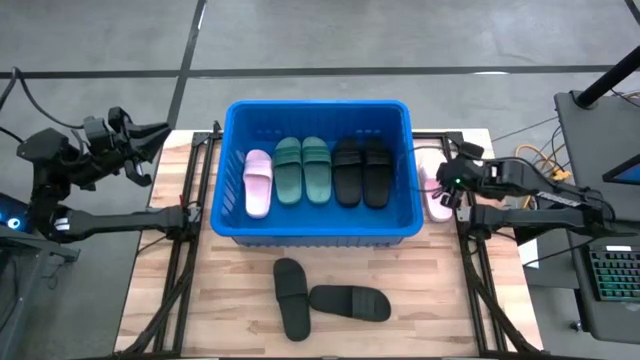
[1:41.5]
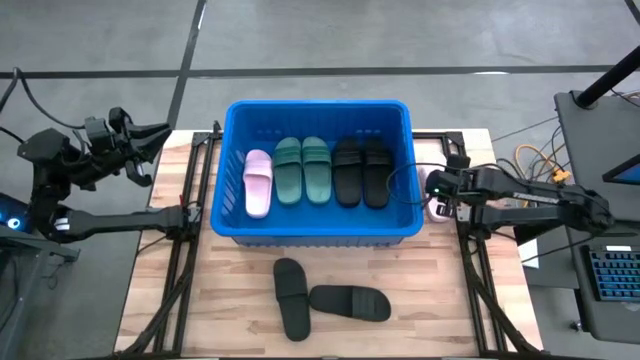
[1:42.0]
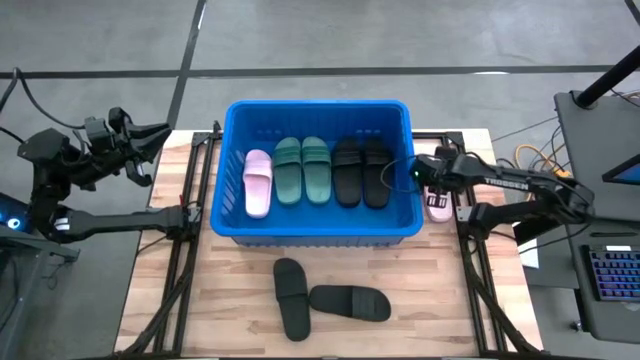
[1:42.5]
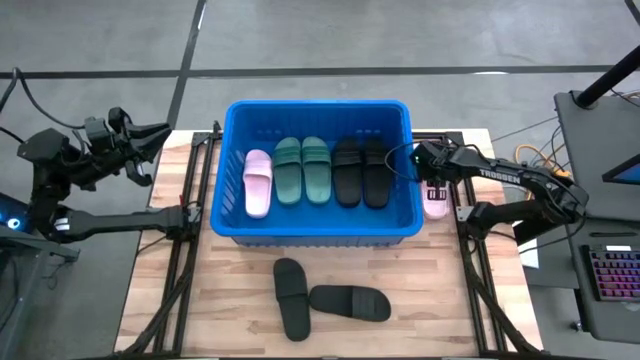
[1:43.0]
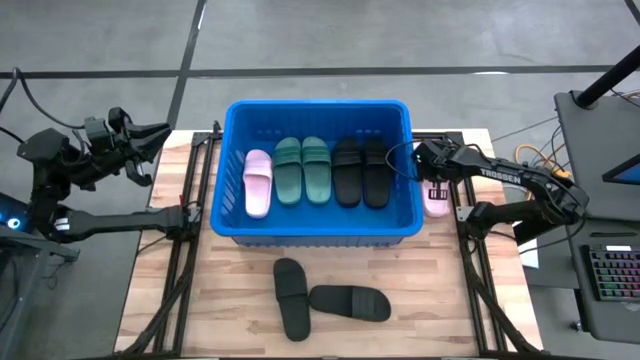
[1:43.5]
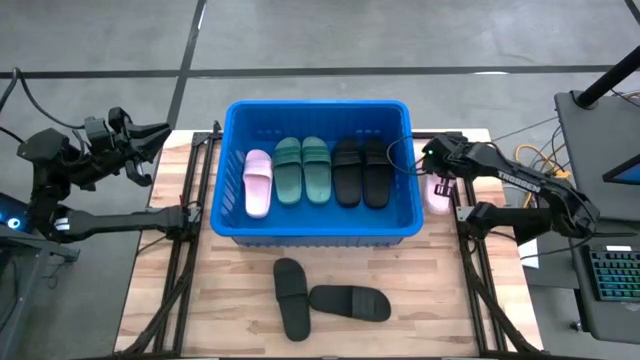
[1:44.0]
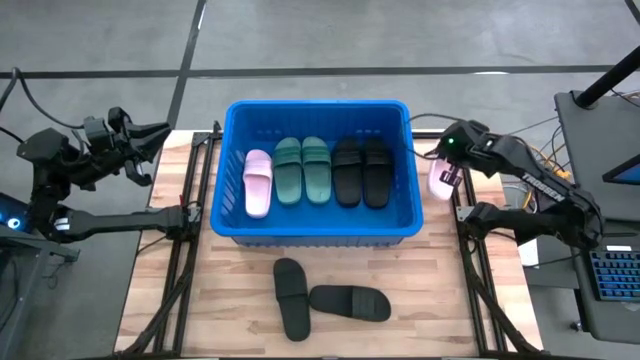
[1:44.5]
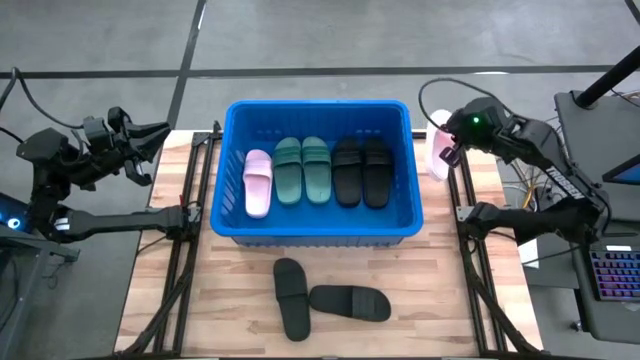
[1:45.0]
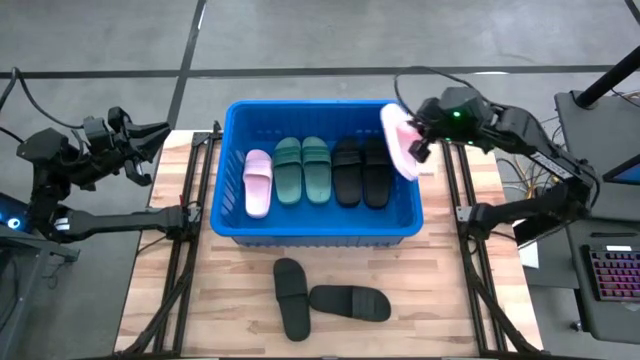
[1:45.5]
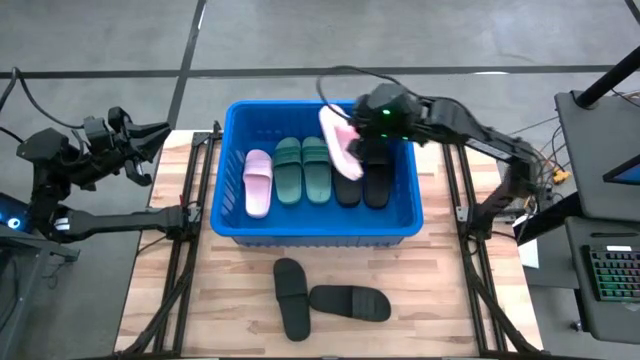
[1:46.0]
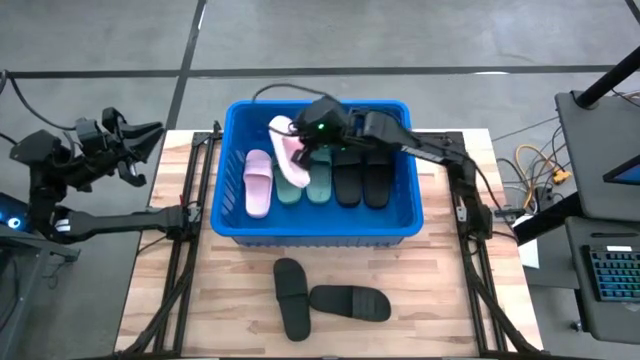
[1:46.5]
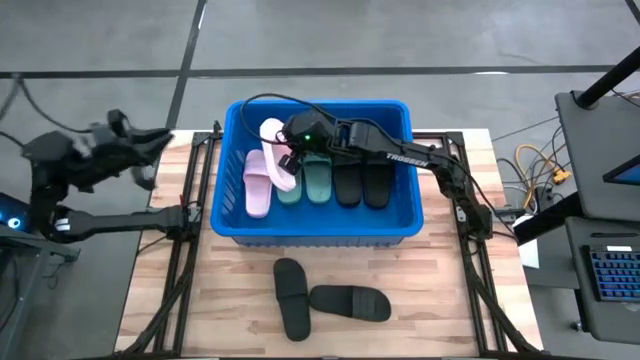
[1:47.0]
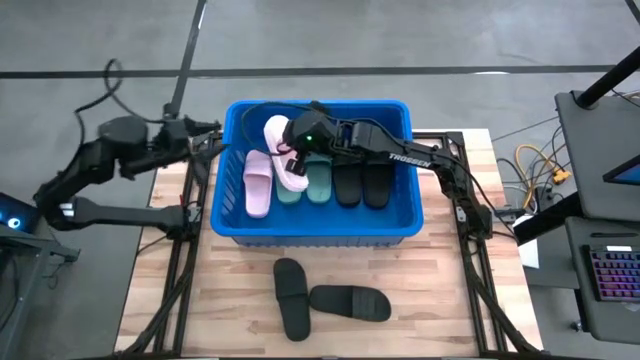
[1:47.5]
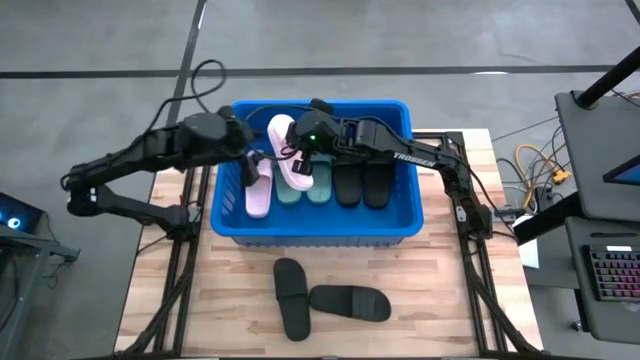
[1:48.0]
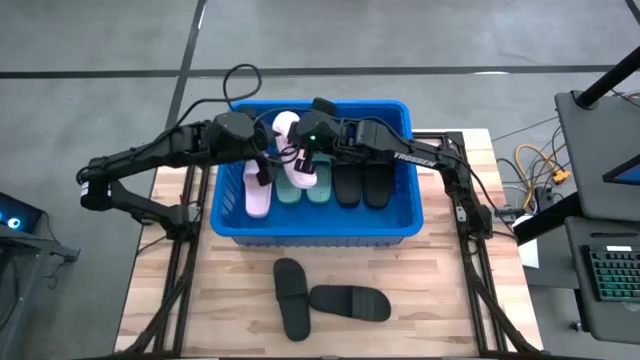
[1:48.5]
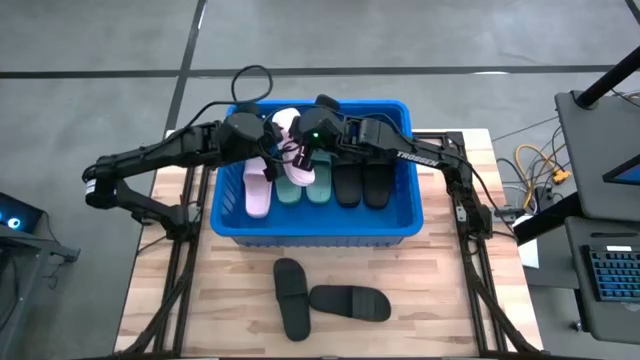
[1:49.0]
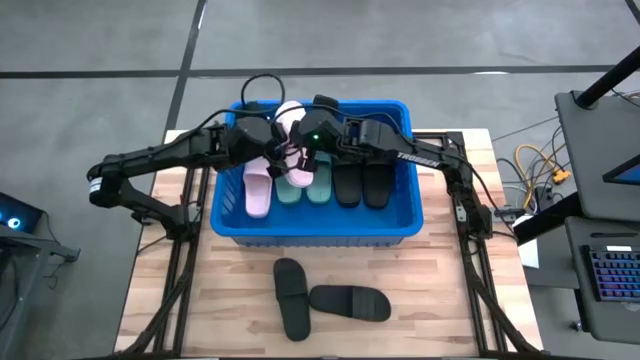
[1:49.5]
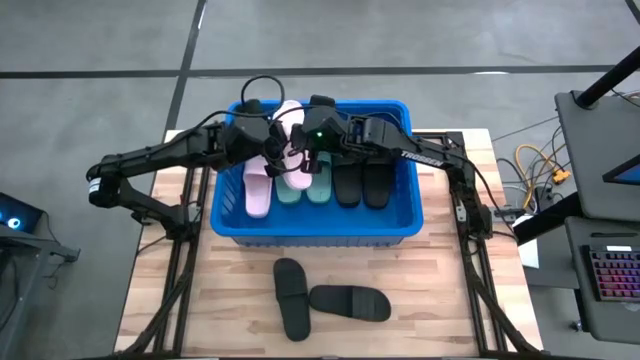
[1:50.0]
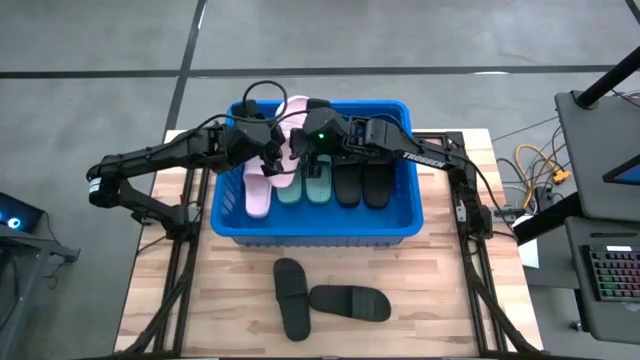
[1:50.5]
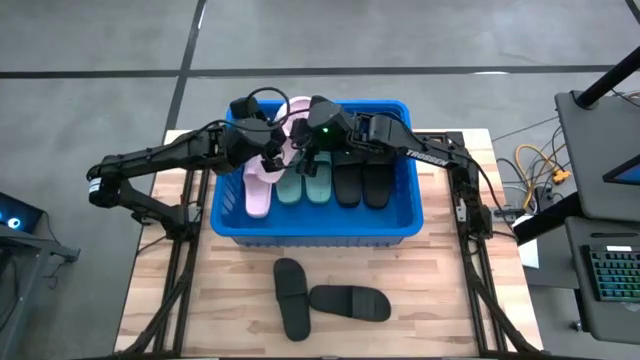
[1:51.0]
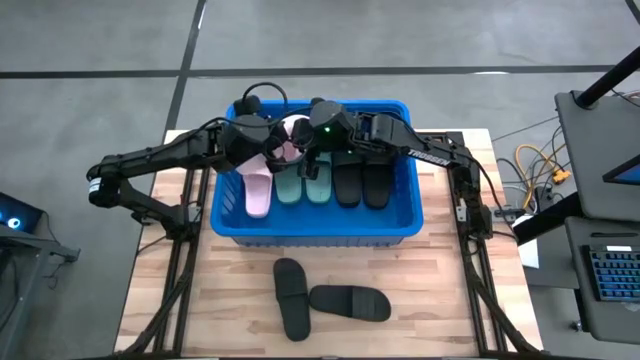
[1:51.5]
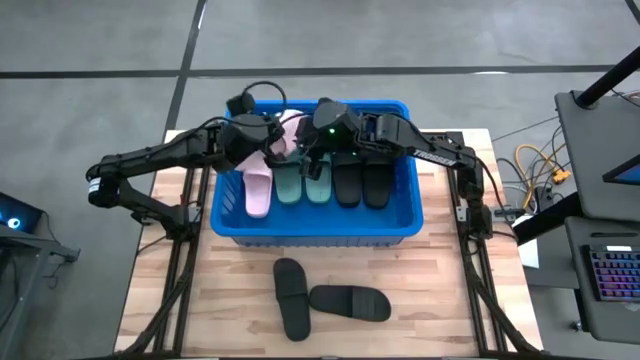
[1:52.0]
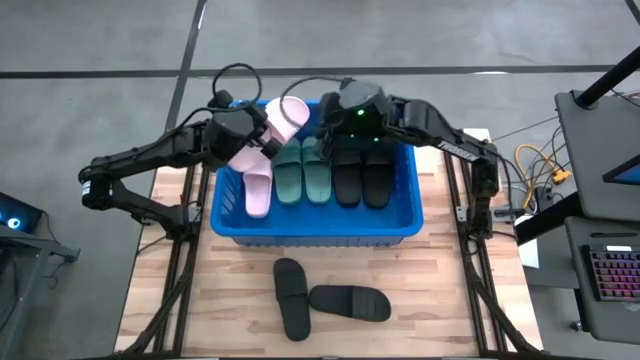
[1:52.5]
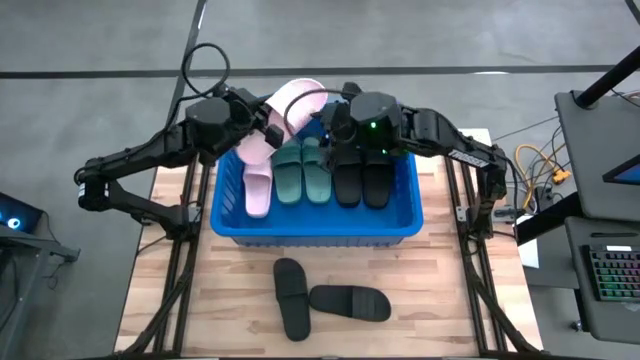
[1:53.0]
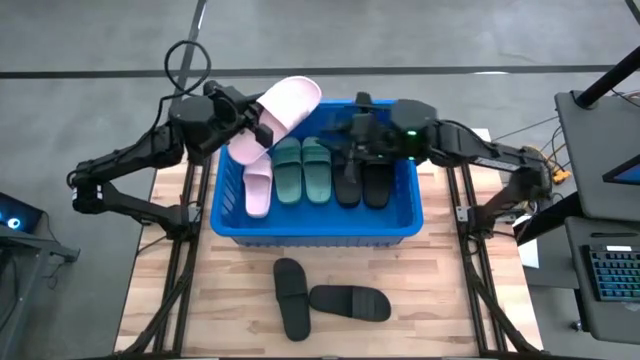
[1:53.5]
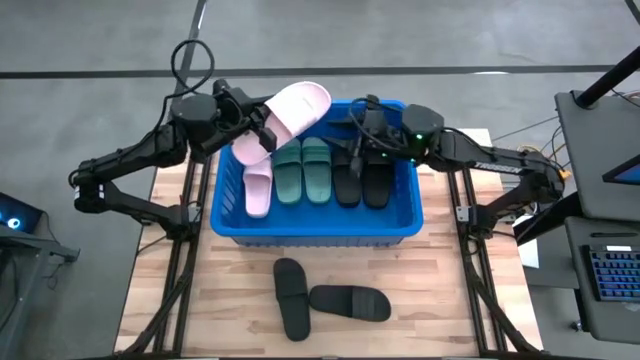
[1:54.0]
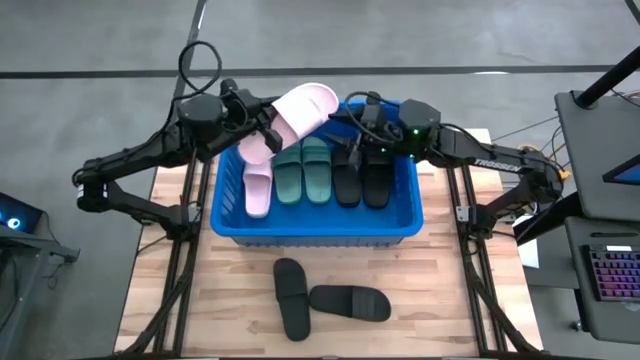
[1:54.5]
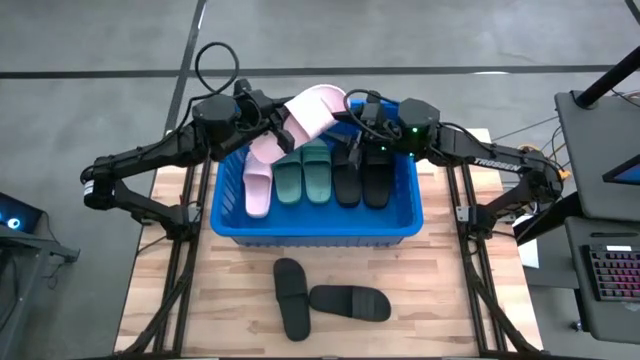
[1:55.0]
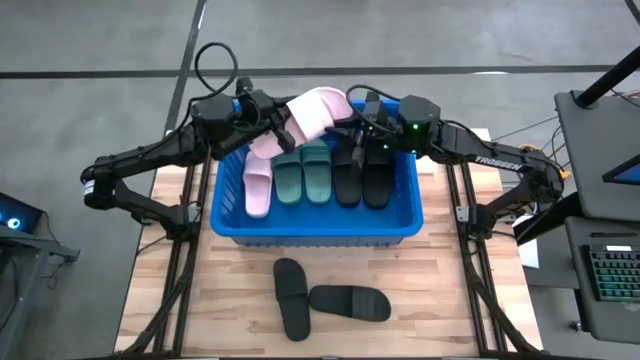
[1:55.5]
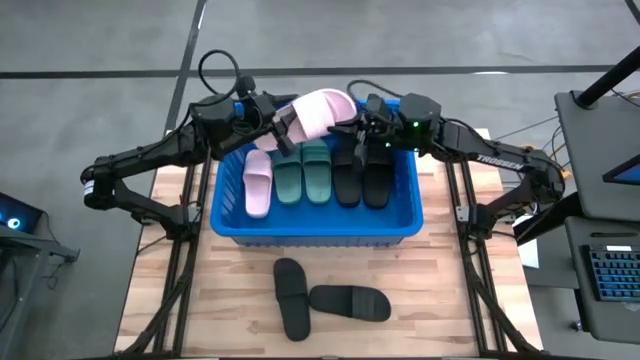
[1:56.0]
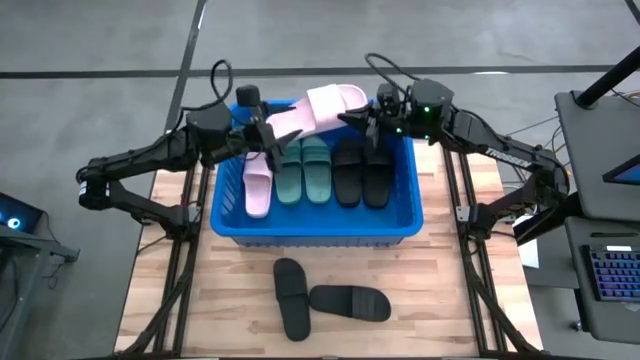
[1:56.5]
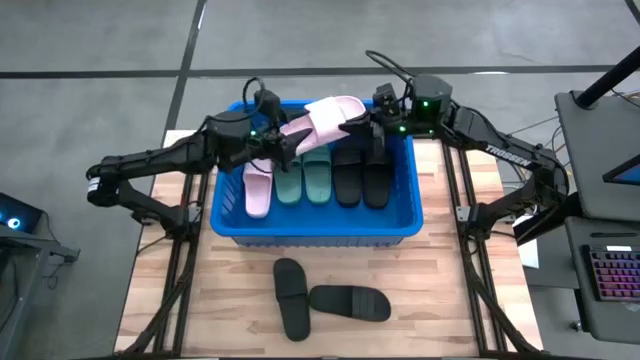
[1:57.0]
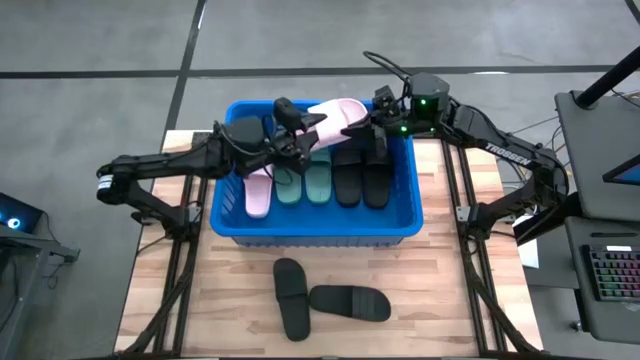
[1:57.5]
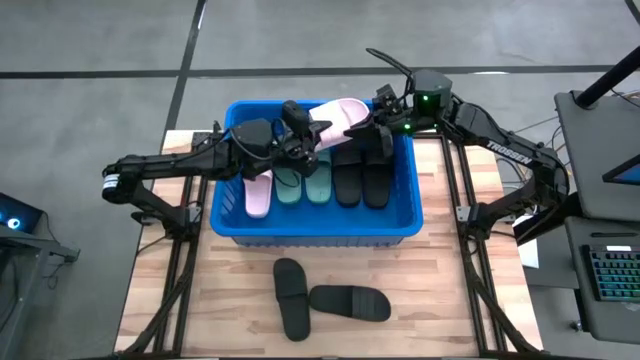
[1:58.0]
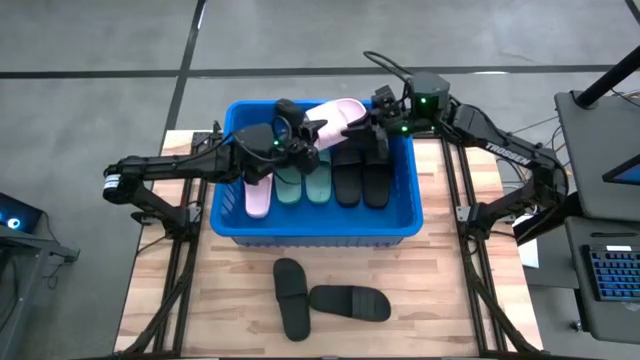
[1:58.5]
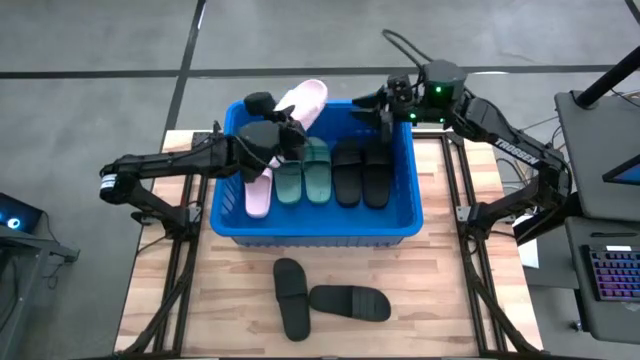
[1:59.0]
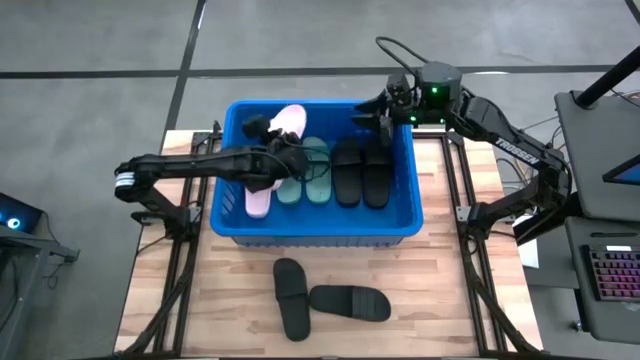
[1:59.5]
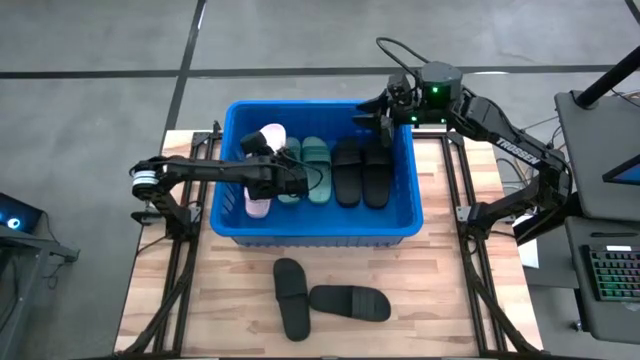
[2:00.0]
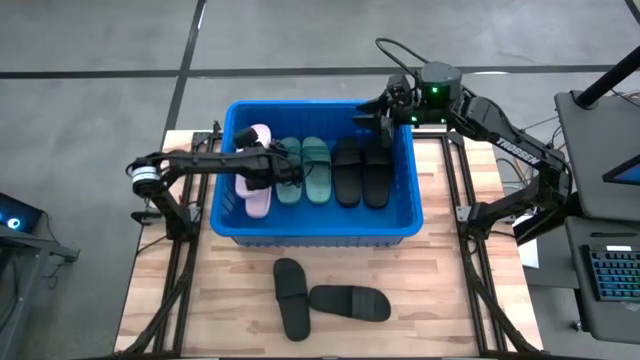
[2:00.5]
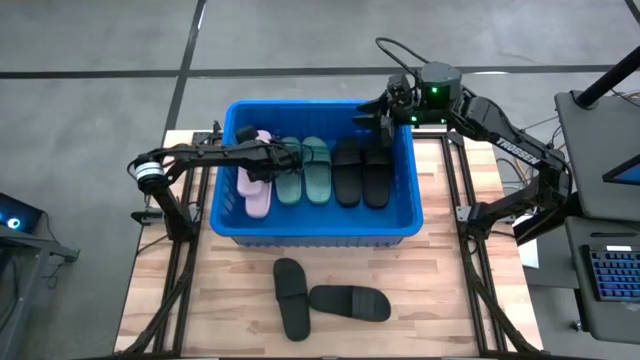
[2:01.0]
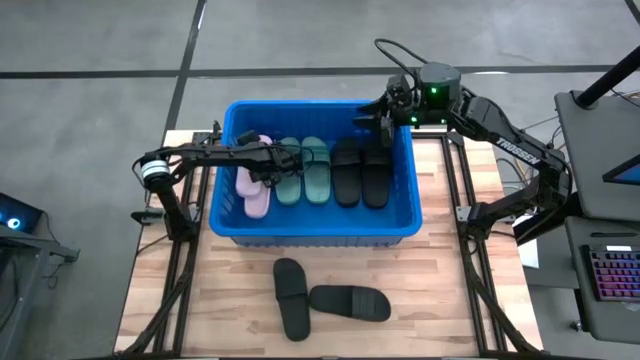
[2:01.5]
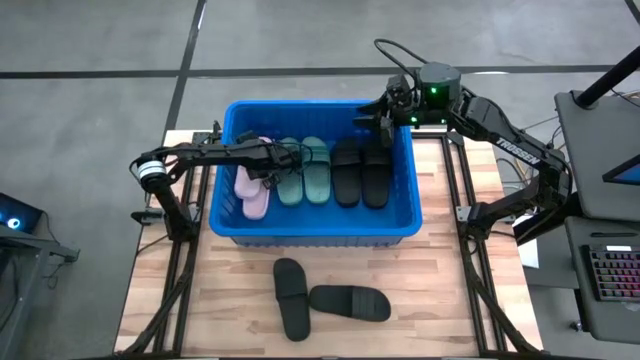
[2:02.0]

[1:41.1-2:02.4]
Task: Pick and place slides into bin
Put the pink slide into the blue container
